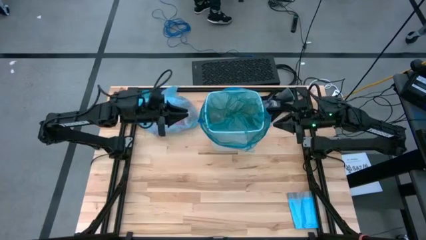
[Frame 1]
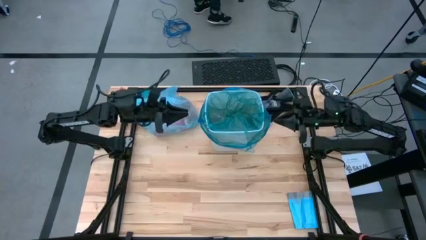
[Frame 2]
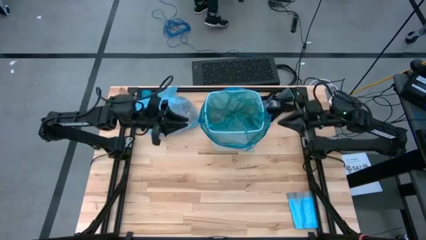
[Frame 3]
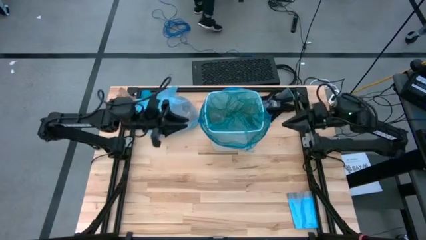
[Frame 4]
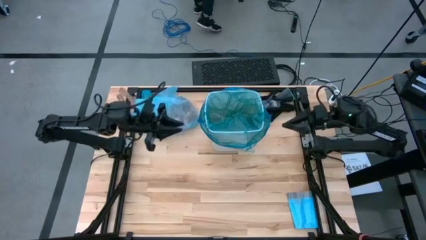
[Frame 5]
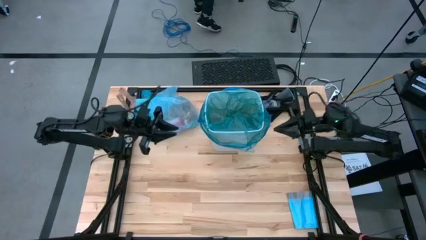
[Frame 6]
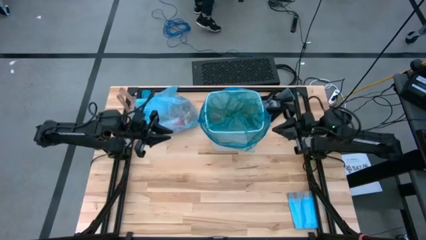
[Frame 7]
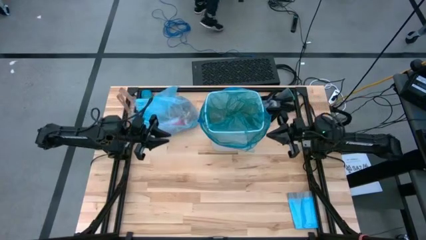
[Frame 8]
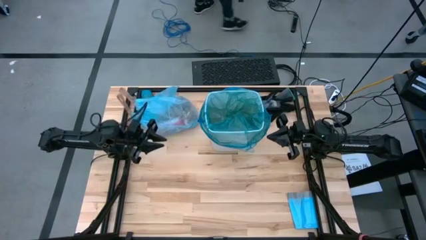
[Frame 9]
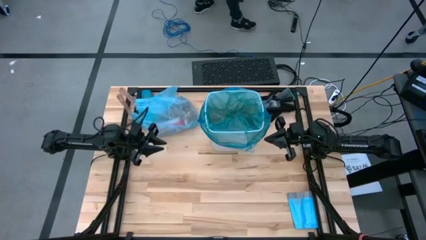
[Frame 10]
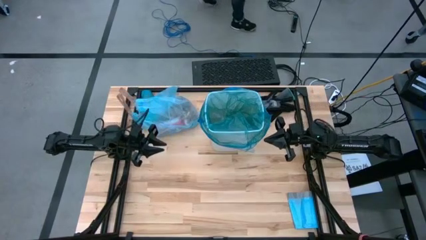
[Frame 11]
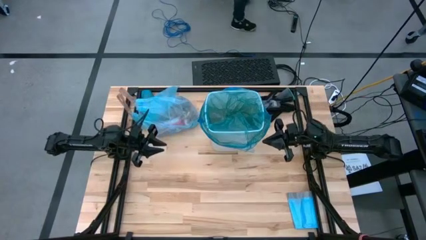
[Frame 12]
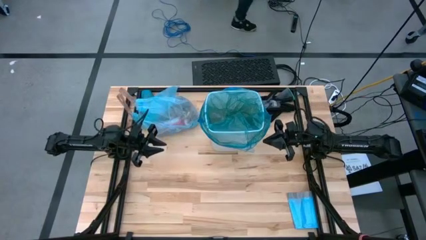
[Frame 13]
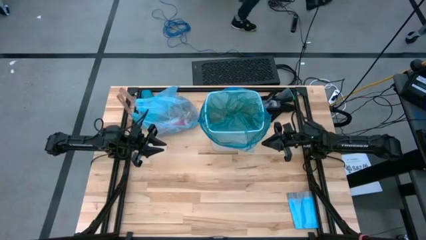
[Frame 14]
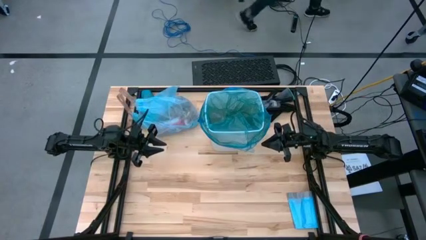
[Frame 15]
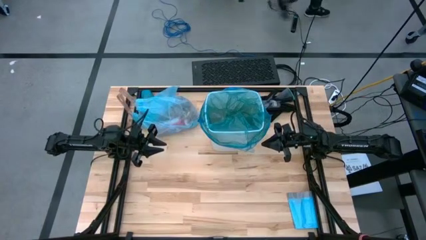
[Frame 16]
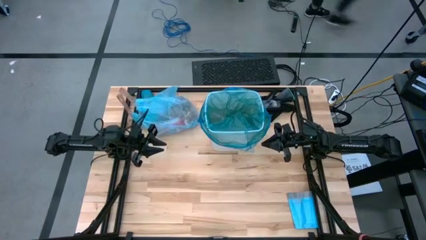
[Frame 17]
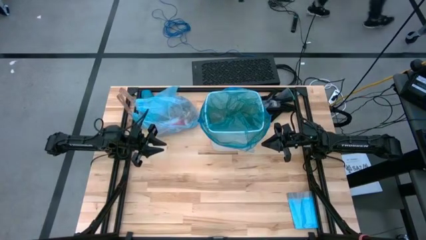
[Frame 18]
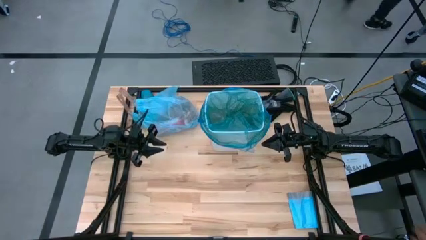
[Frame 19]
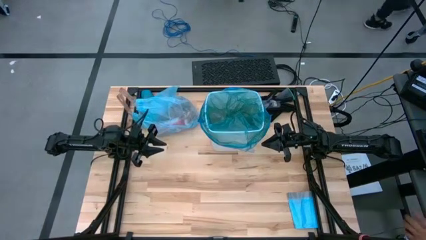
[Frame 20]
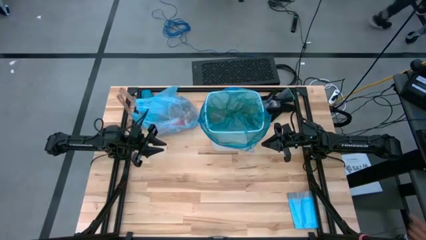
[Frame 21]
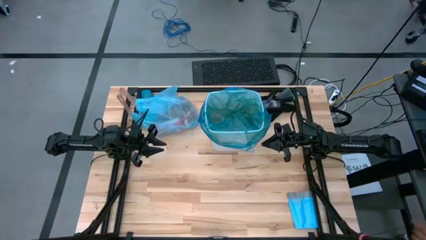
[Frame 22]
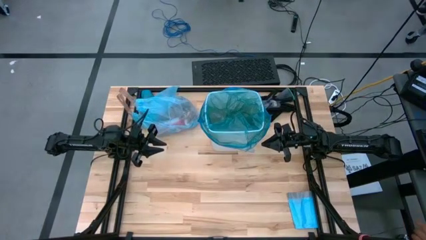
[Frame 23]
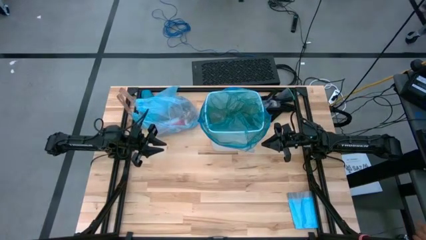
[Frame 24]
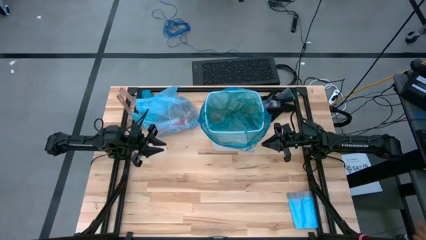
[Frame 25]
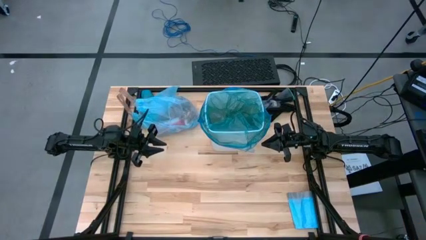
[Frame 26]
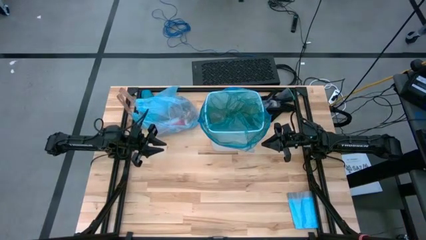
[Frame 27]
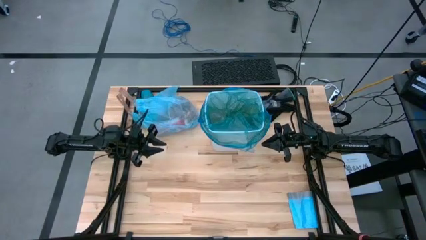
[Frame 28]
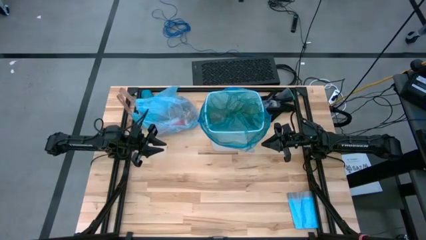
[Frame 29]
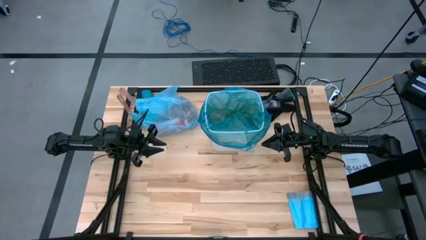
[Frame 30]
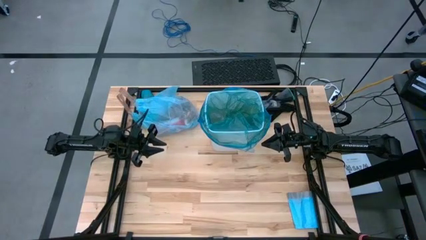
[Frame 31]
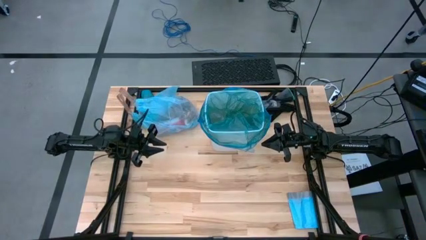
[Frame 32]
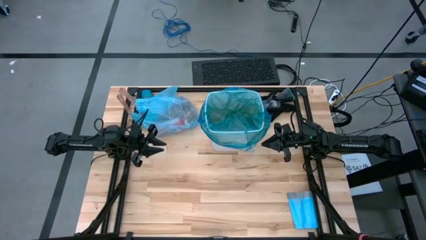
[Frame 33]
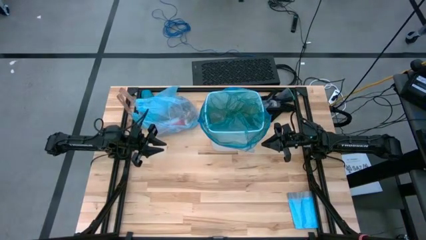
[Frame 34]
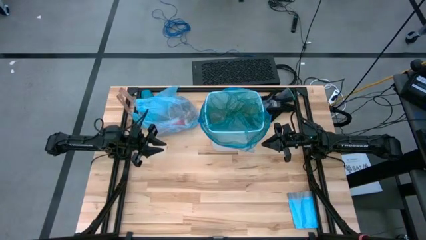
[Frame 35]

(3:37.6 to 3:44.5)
Task: place trash/remove bag and relplace
Return to Home Position

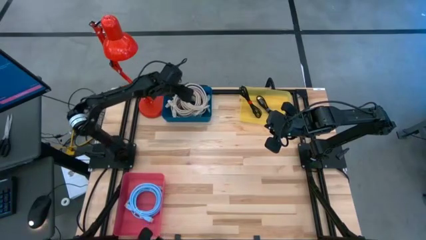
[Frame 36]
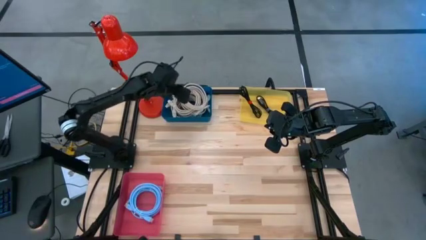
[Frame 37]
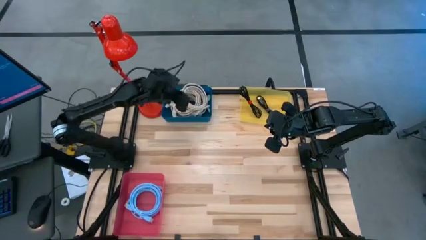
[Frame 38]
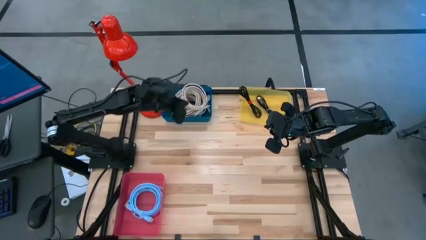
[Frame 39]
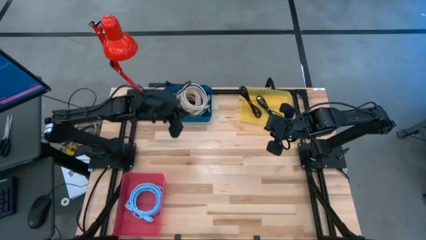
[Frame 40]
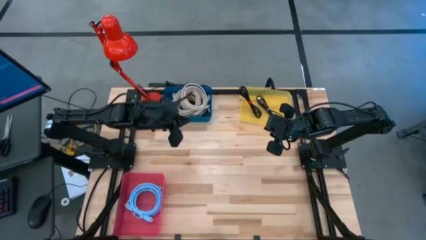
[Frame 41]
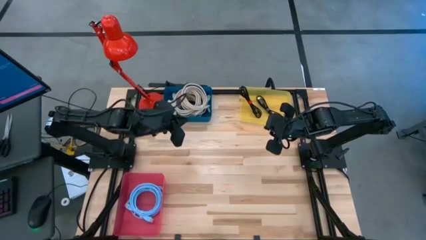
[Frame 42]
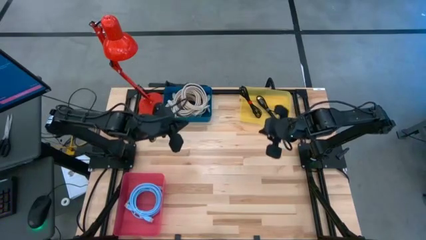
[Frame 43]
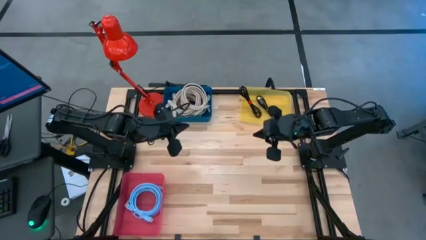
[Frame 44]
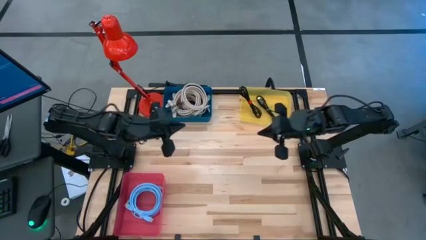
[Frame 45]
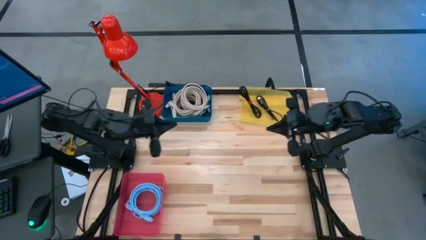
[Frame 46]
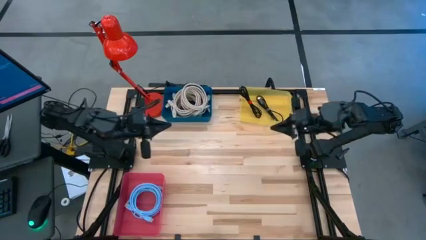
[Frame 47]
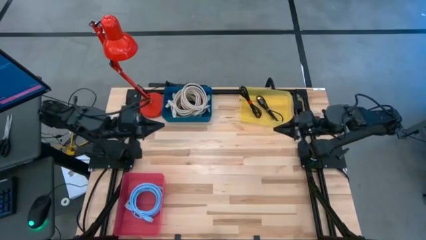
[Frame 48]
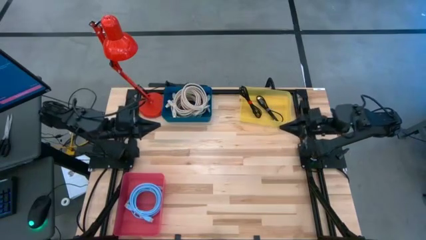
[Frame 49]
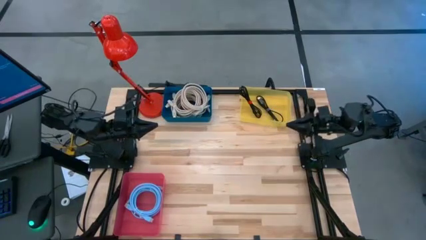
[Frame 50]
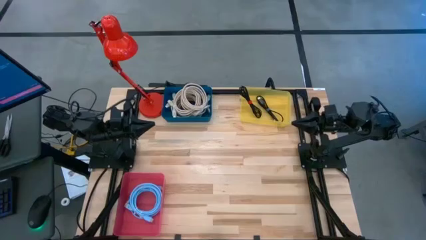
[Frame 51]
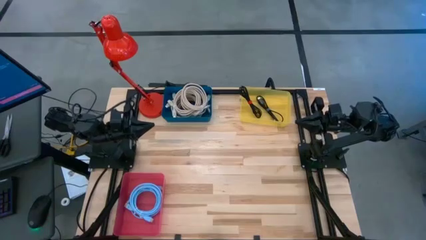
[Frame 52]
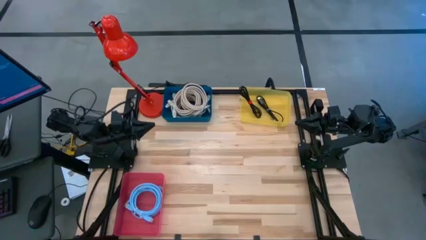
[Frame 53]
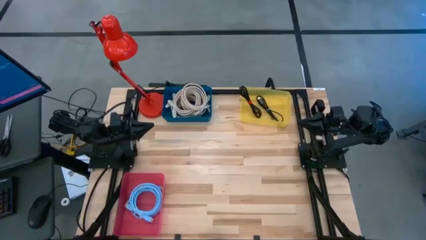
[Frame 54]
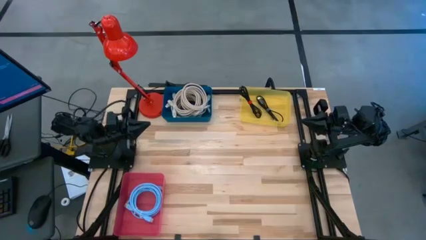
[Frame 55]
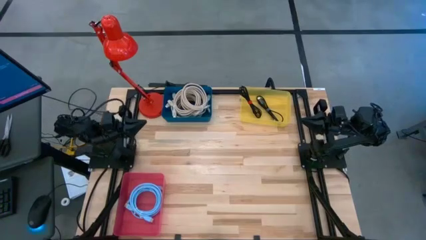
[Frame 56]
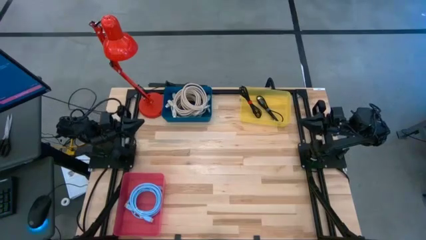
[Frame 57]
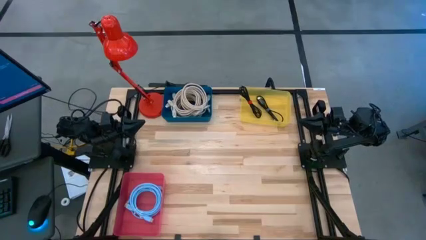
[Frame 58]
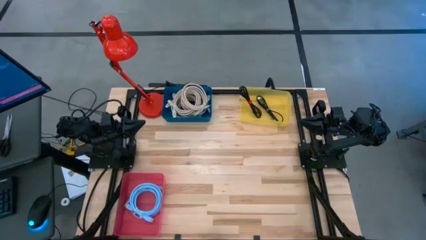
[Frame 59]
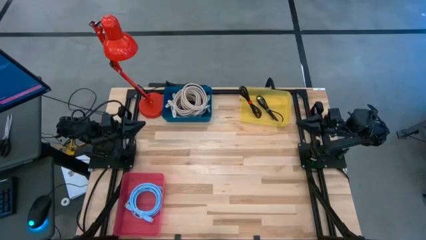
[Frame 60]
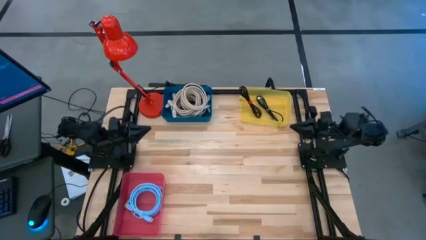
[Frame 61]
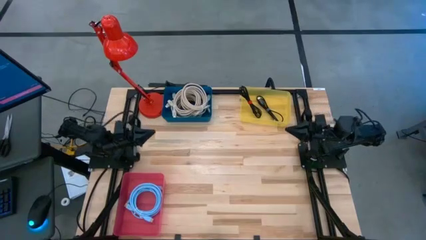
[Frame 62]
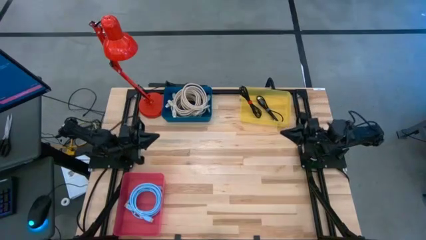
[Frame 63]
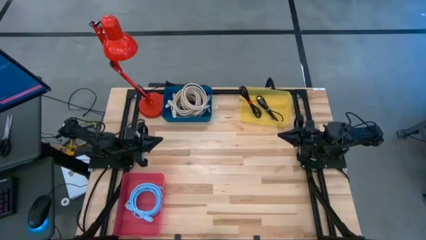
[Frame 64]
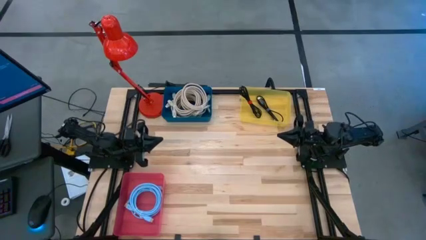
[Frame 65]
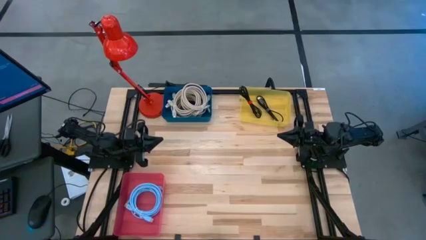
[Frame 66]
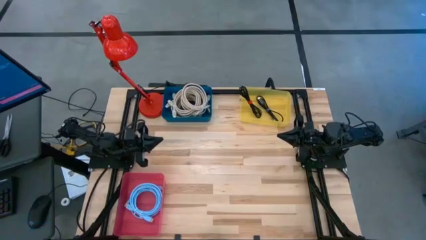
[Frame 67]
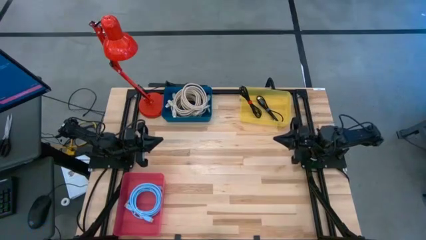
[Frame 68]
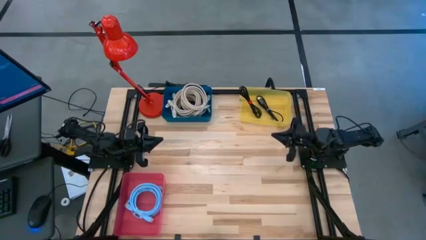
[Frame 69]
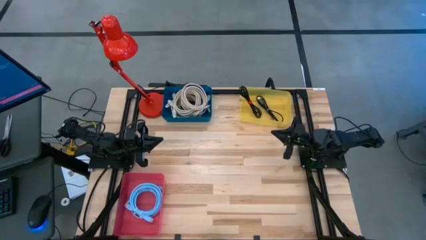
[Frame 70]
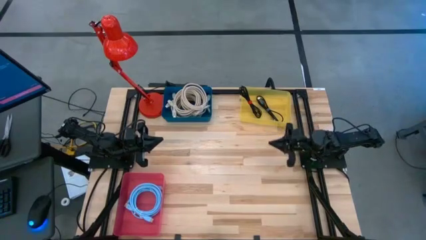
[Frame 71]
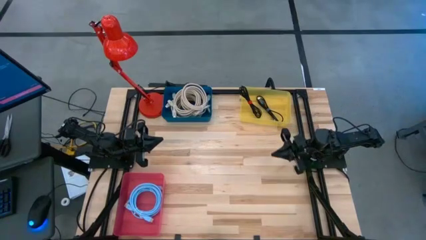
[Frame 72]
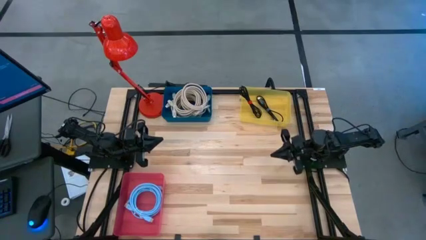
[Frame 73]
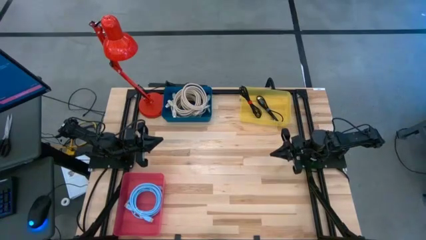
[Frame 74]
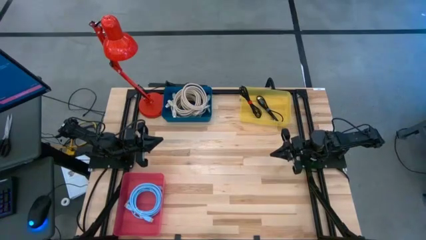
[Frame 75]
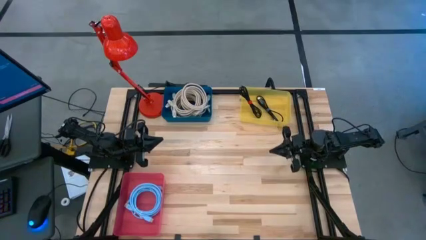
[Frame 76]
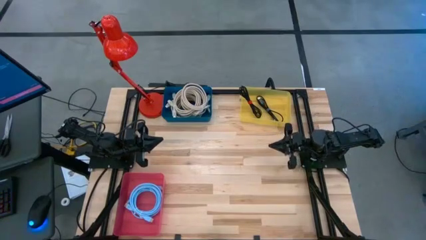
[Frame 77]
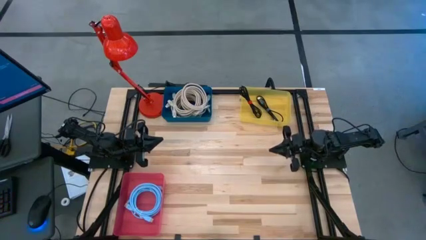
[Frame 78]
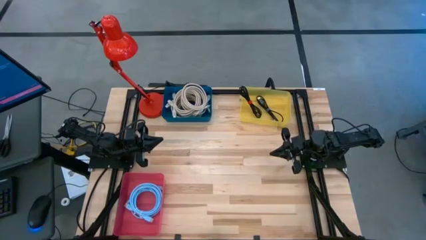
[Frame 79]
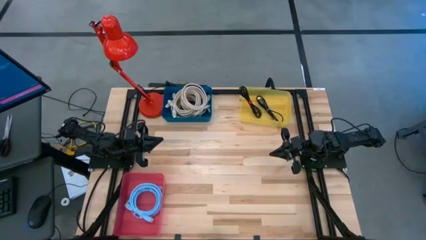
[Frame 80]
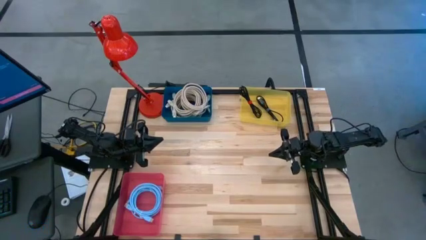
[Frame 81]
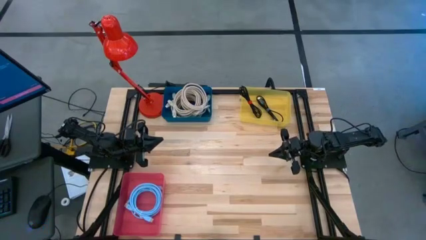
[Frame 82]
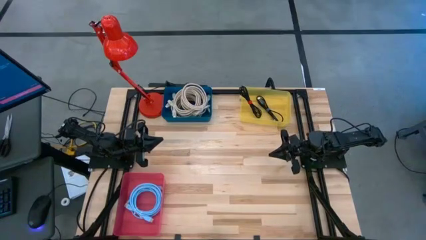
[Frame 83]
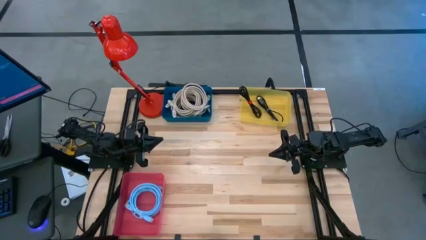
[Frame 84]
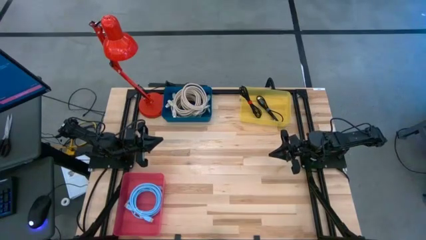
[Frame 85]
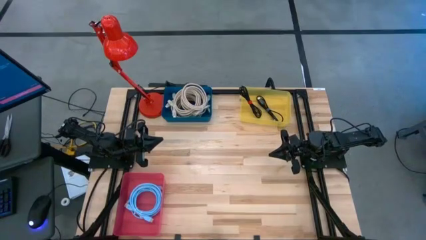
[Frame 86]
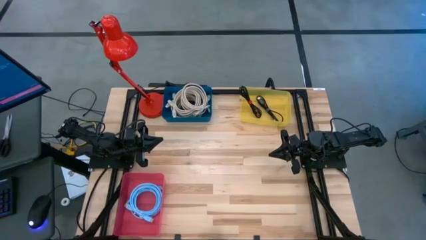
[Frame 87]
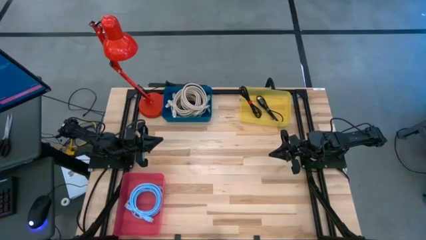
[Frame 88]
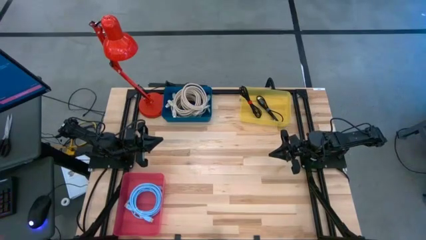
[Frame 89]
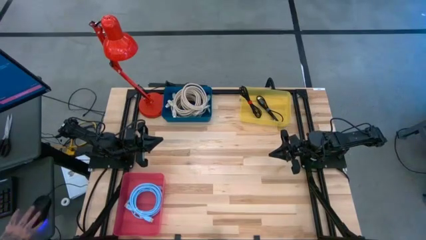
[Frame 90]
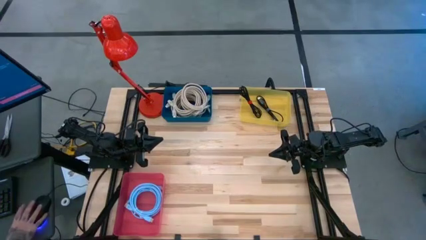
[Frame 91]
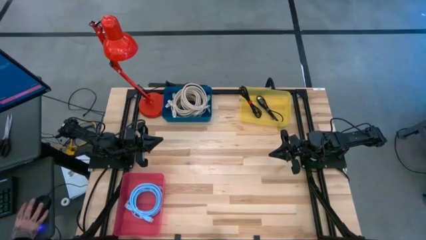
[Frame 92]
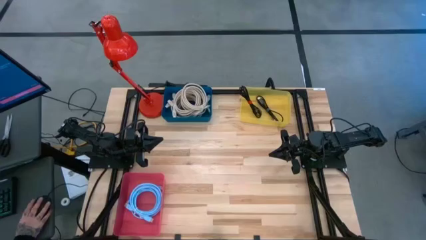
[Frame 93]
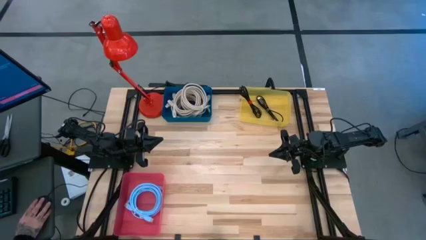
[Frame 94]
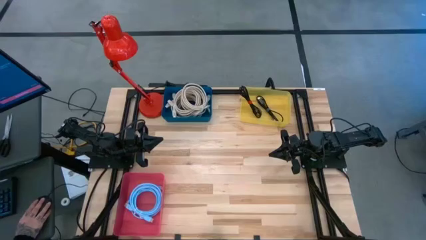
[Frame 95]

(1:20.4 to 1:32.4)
Task: Pick & Place USB Port
Return to Home Position
